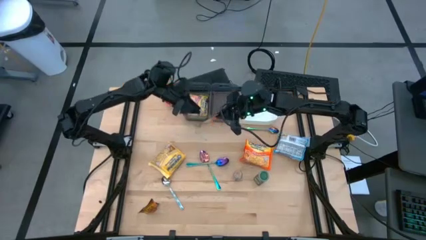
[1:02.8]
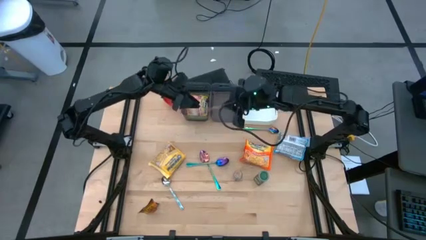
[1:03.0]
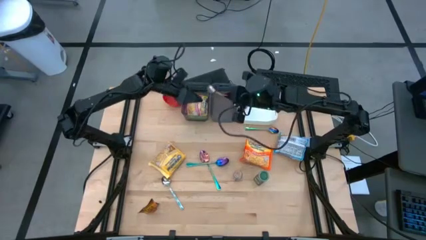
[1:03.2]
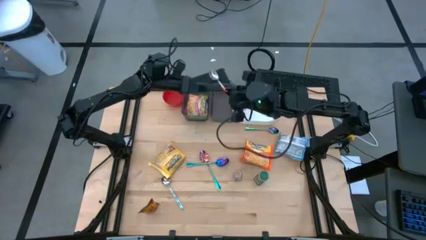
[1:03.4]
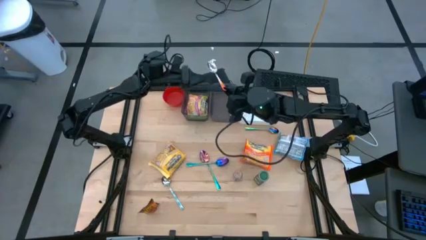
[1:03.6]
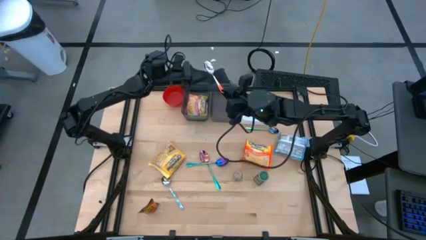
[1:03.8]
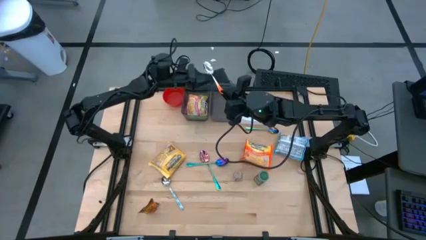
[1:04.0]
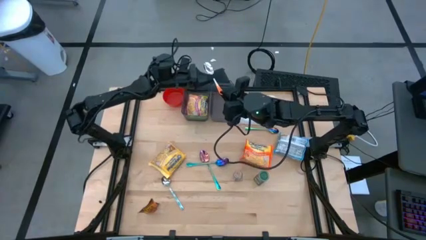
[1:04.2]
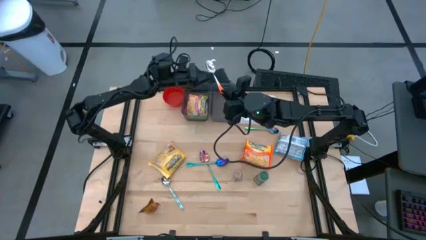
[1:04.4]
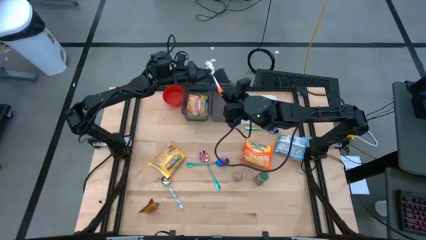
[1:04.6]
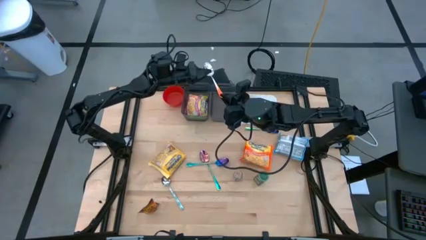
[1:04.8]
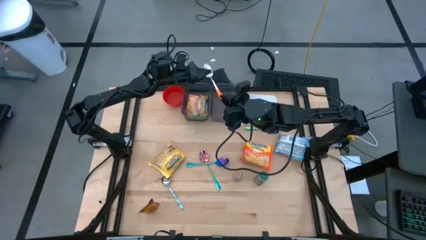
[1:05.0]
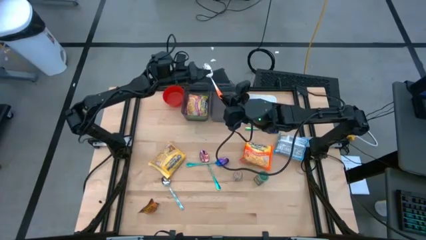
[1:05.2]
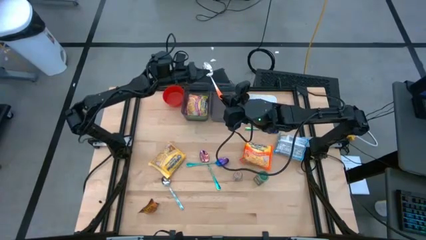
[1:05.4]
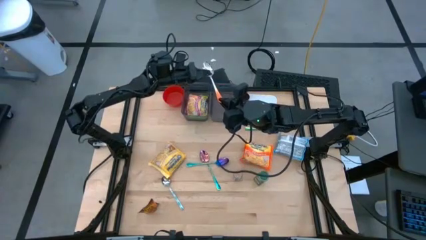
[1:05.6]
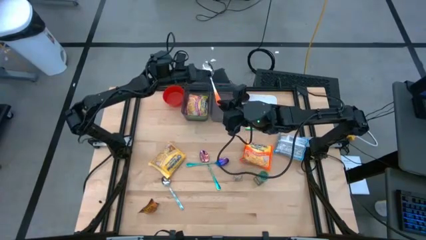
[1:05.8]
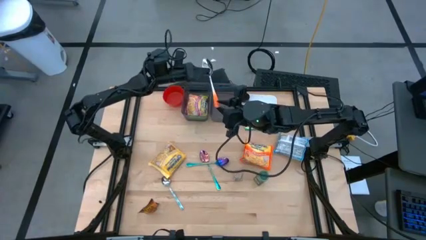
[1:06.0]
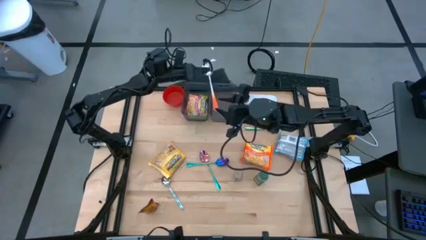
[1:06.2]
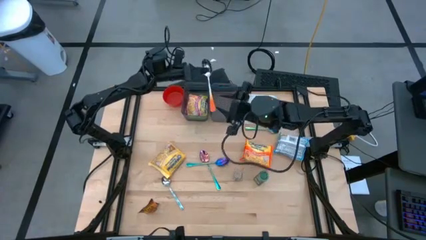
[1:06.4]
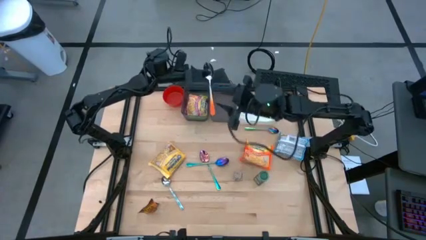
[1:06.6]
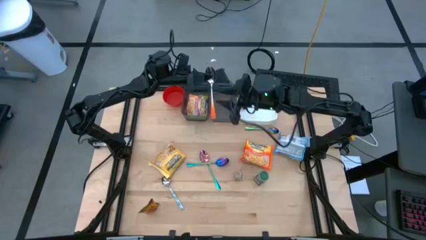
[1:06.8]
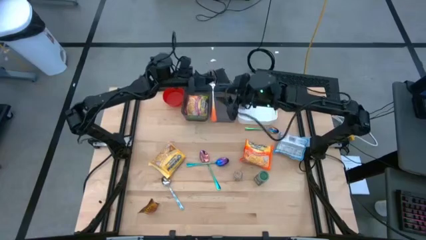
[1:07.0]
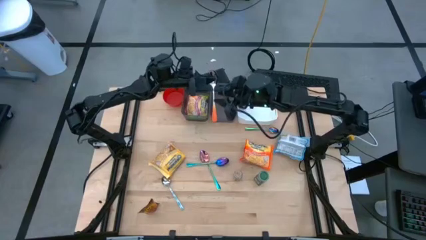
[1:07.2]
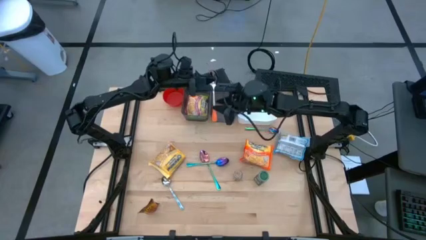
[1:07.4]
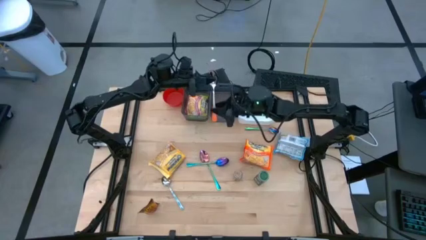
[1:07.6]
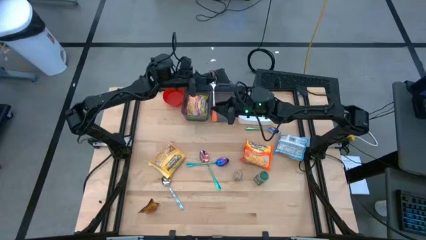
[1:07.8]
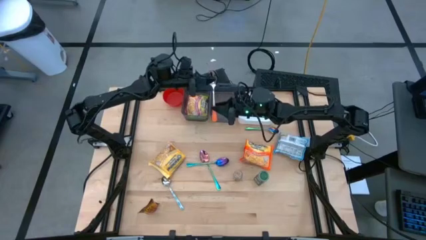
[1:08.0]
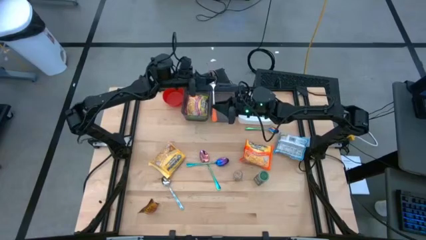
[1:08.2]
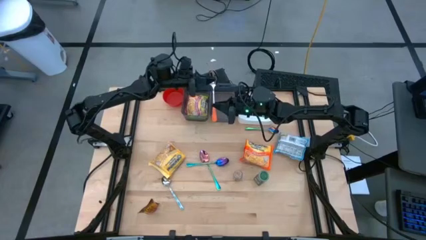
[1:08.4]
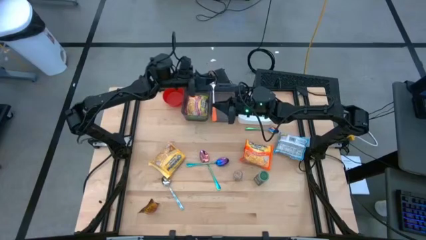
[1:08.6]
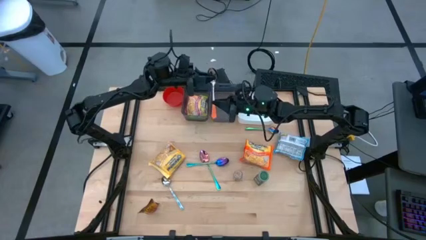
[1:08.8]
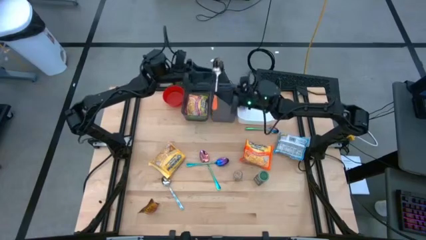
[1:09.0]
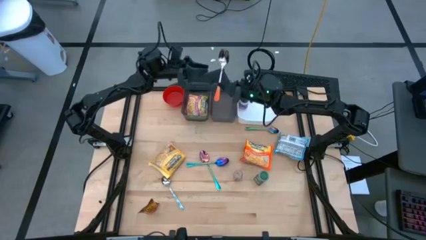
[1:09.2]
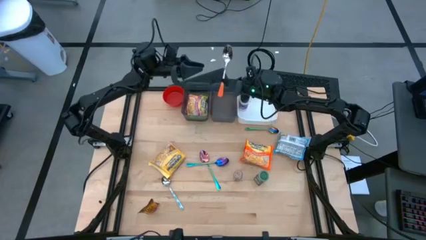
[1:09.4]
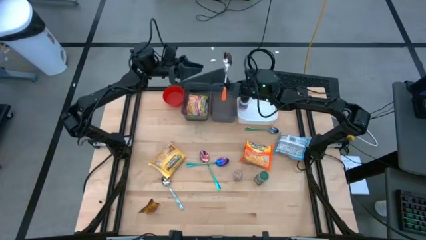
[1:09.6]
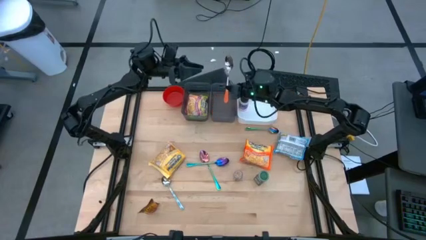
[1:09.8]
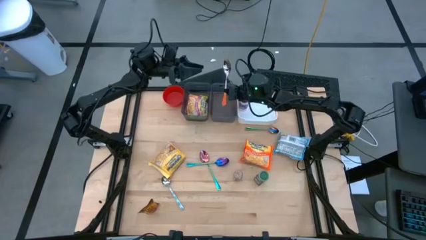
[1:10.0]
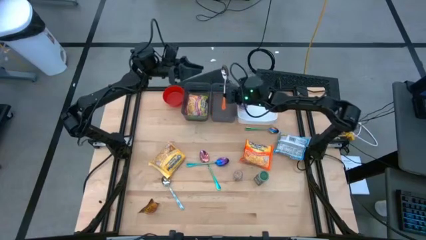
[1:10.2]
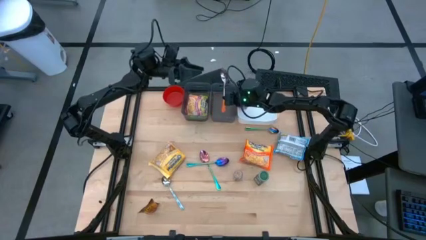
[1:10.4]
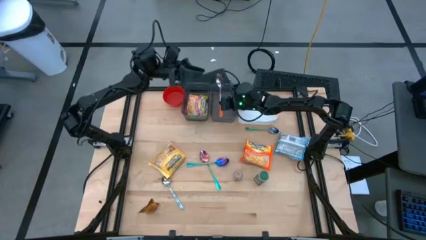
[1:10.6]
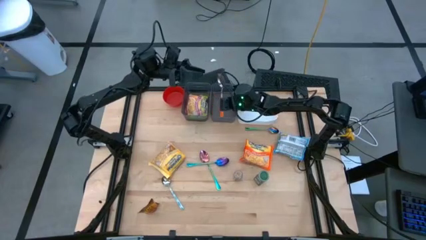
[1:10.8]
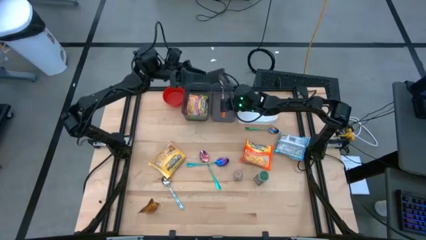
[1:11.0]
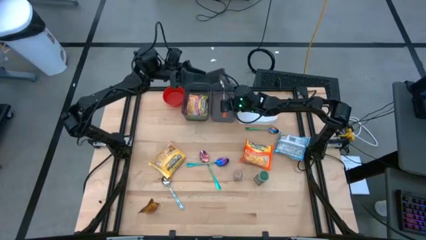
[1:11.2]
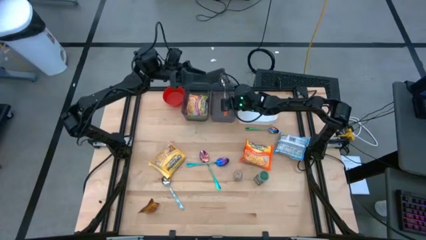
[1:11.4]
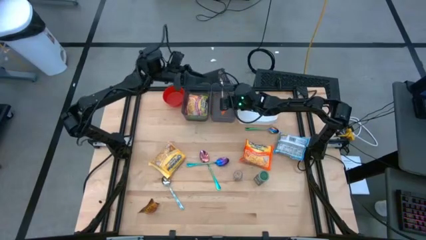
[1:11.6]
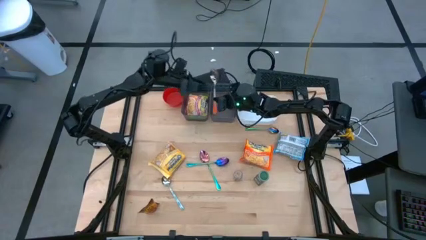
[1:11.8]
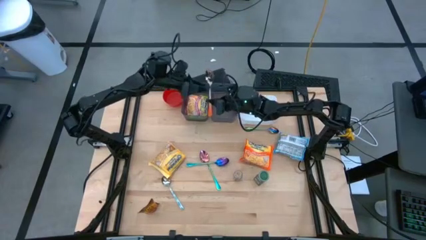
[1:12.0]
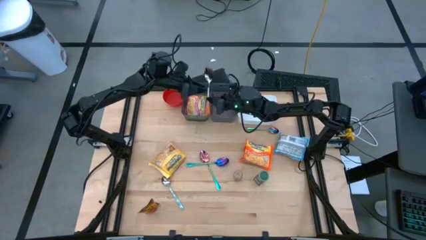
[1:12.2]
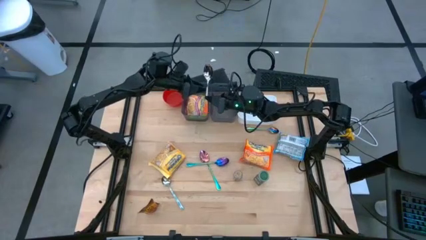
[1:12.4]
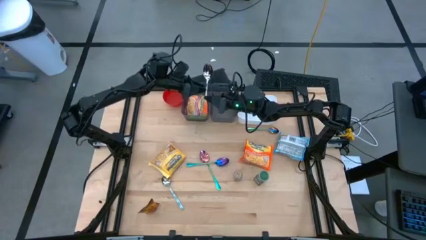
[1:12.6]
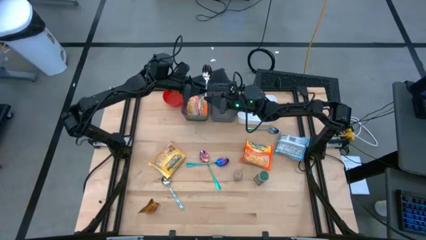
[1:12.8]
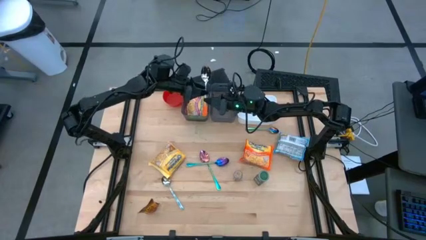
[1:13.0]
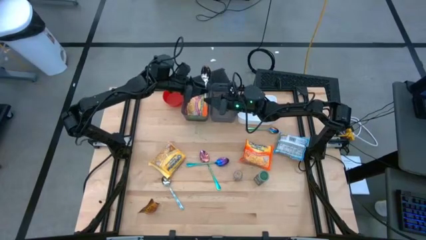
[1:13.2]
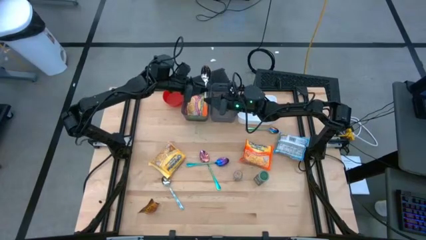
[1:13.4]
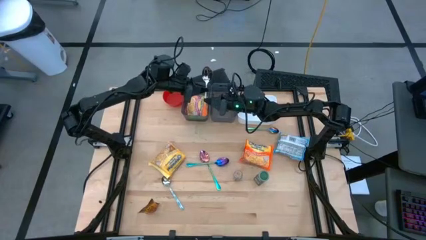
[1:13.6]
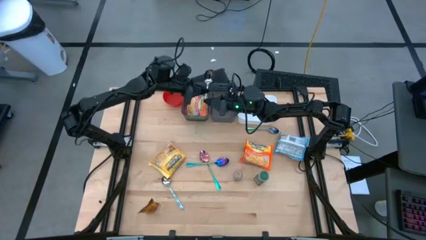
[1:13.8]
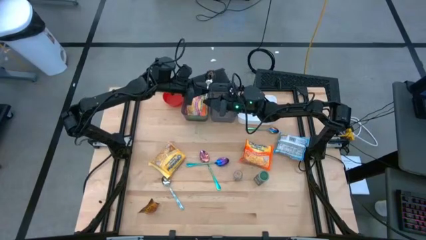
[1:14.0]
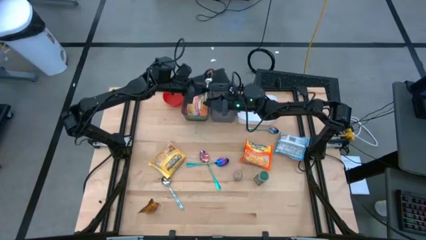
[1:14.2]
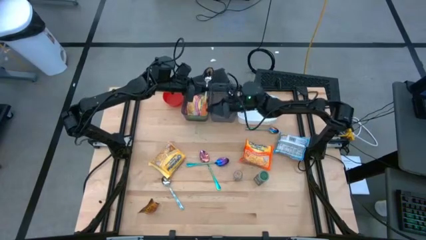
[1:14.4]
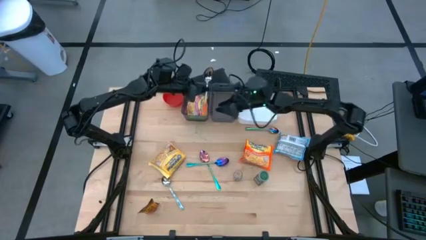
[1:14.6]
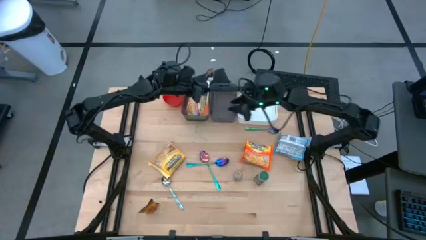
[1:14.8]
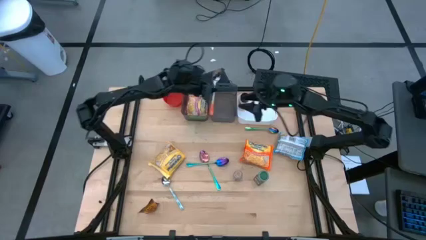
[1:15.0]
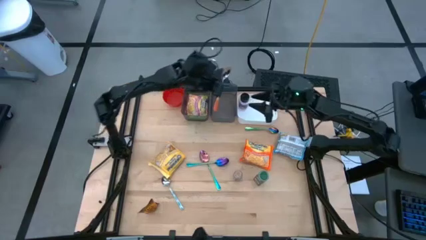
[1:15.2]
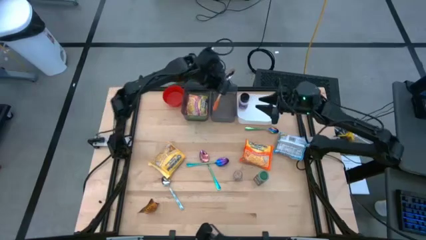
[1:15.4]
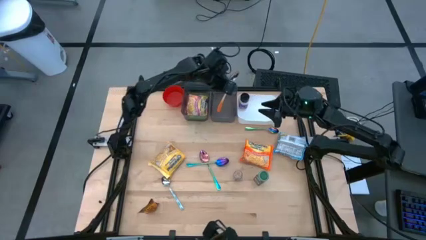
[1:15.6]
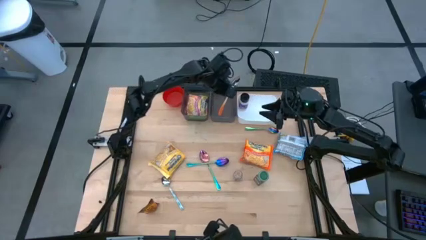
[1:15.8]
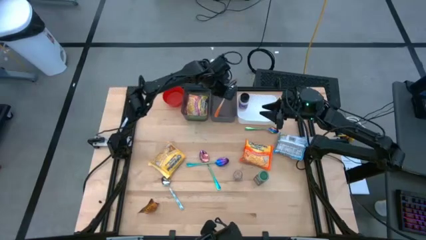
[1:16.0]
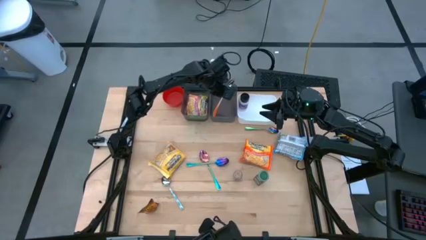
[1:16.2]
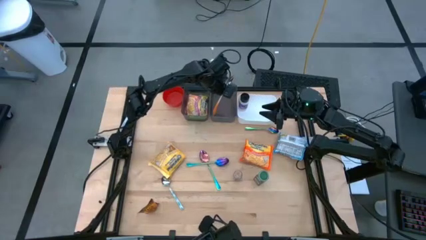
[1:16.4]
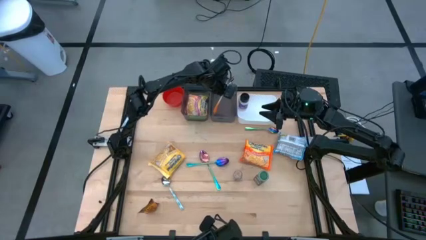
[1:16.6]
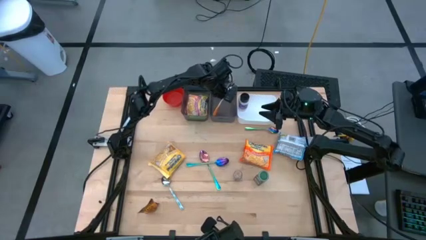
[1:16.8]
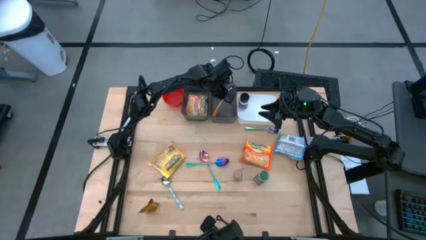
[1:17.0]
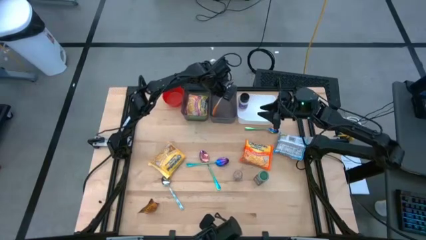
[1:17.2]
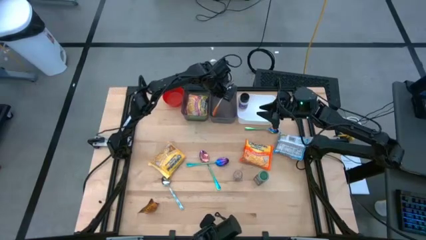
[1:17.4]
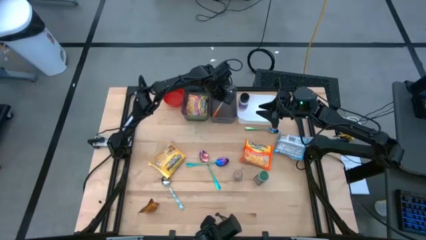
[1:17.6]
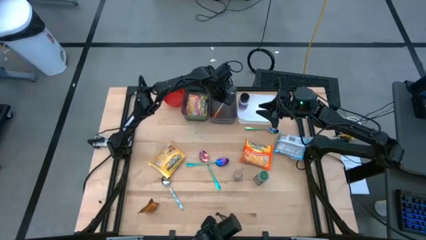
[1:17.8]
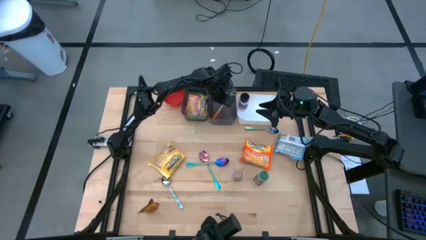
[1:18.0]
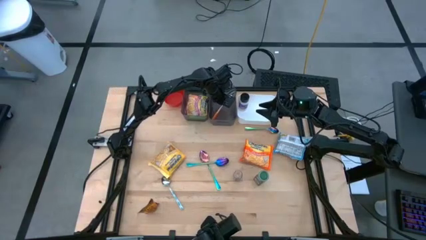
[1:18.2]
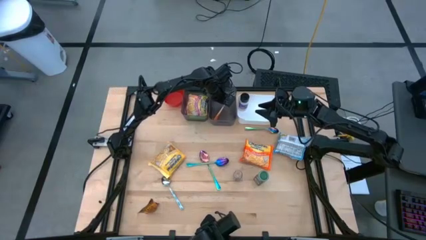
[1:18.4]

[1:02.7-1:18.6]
Task: Pick & Place Food Item
Put the orange spoon into the right black bin

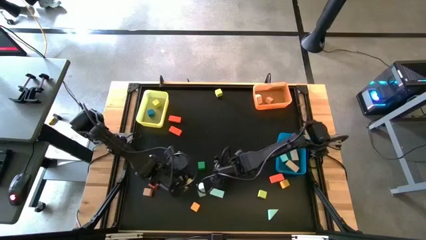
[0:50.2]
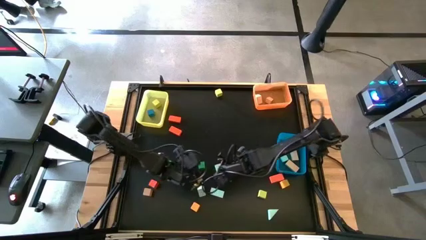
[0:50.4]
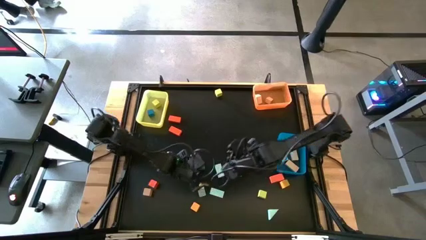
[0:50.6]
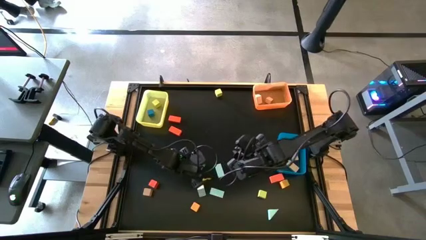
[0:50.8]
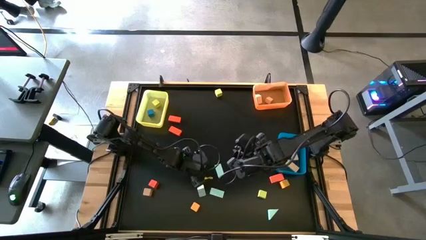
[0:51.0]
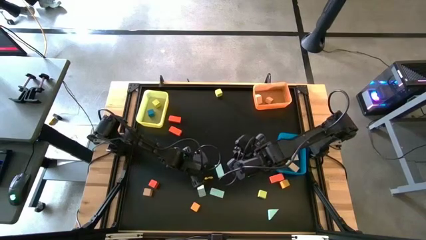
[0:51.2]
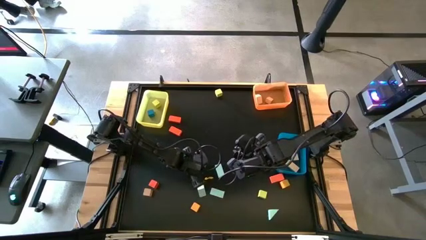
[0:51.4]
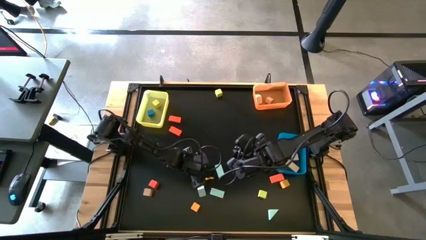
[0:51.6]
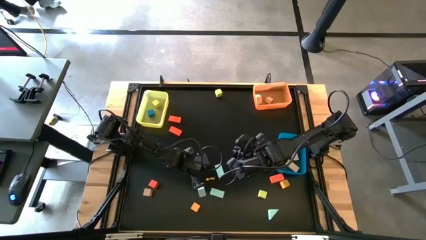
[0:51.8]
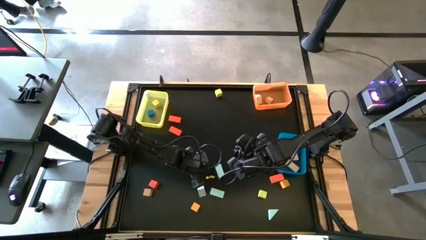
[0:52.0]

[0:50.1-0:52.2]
Task: Sort blocks by size
Put the green square block into the yellow bin
